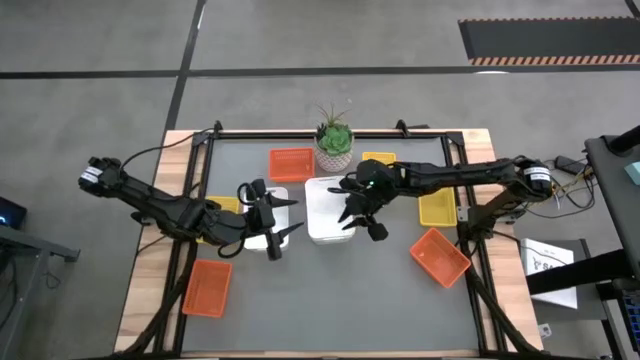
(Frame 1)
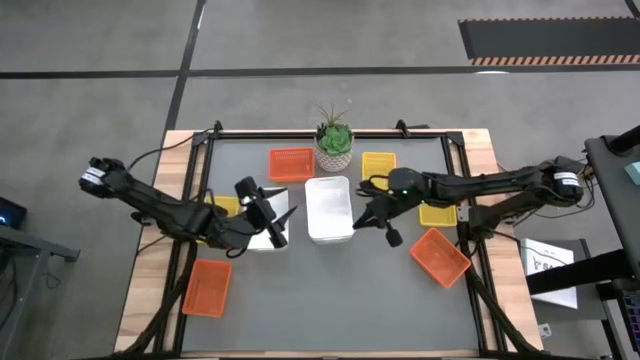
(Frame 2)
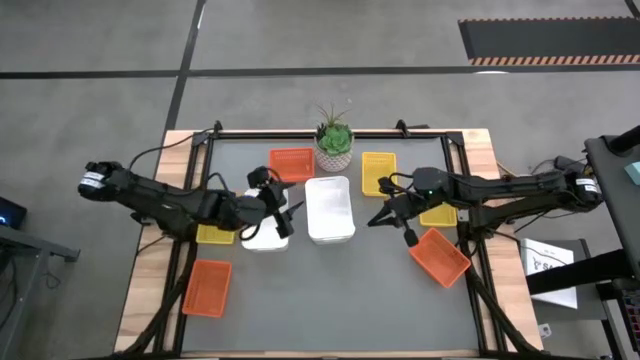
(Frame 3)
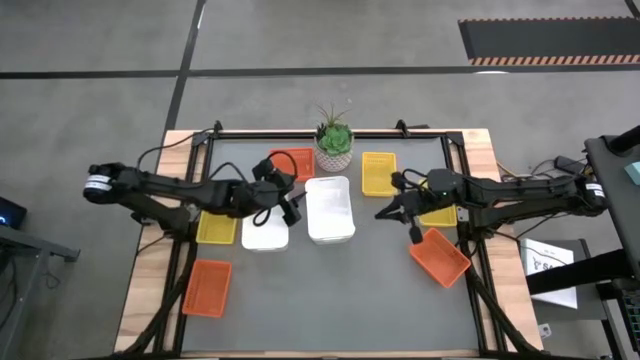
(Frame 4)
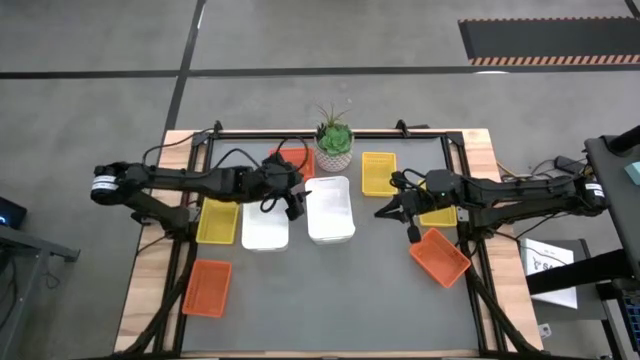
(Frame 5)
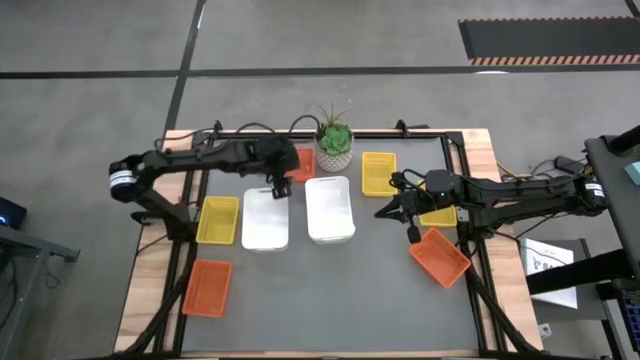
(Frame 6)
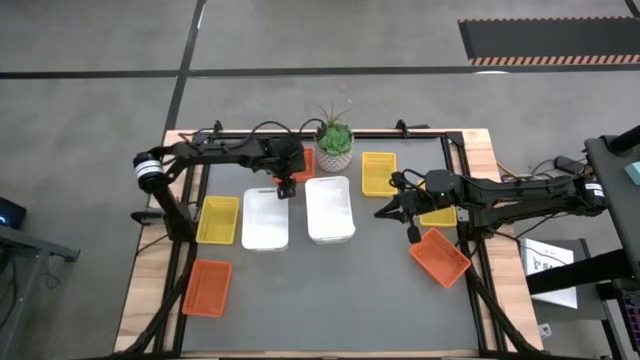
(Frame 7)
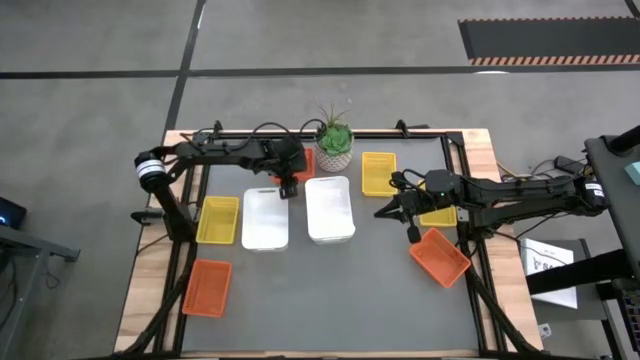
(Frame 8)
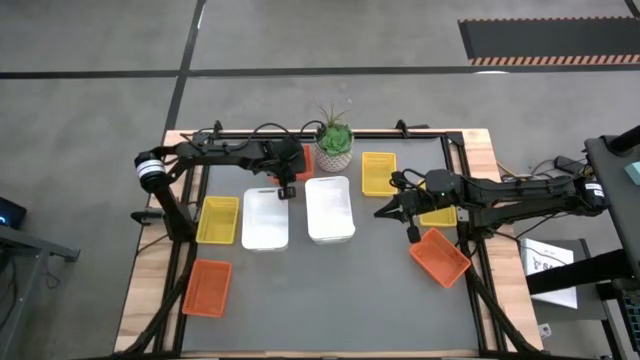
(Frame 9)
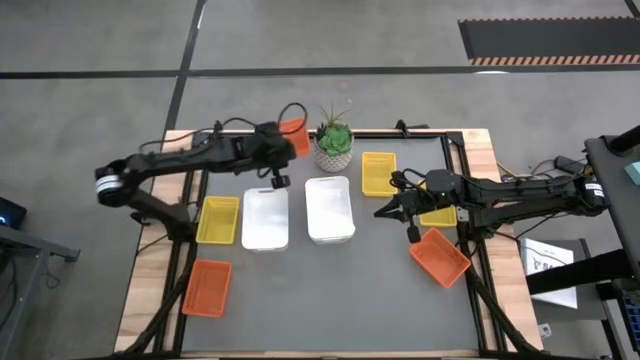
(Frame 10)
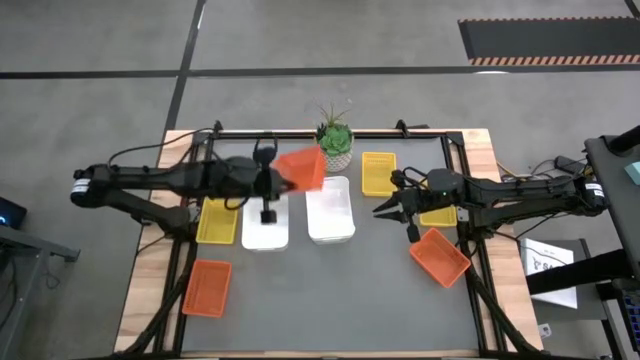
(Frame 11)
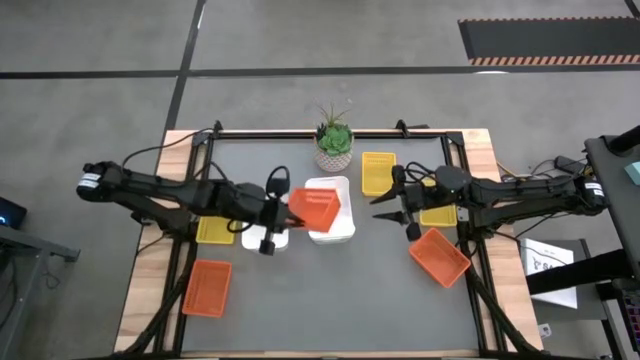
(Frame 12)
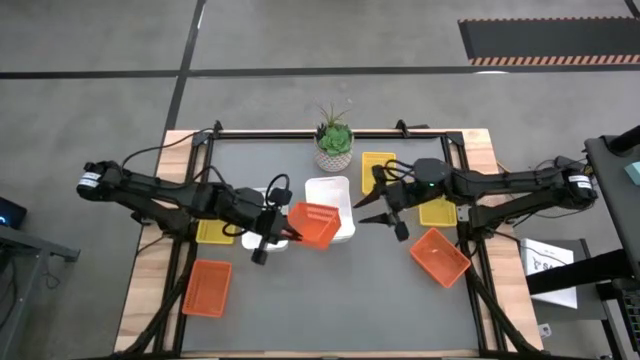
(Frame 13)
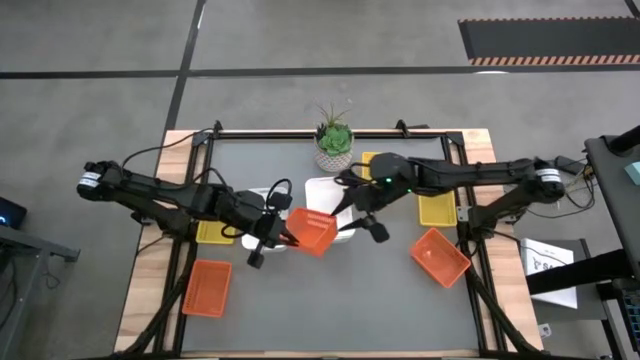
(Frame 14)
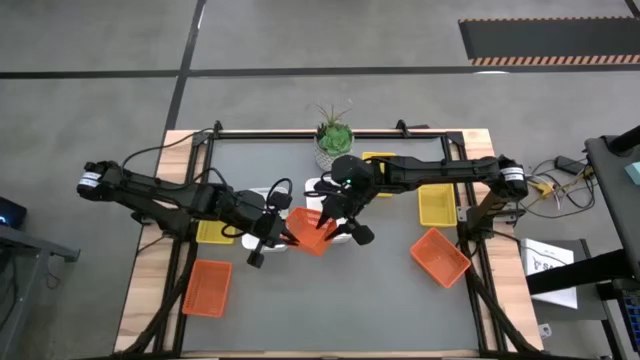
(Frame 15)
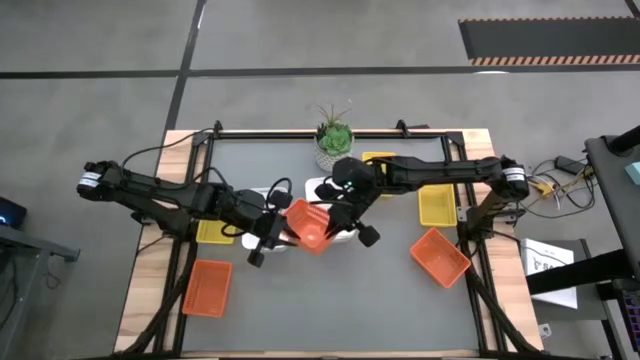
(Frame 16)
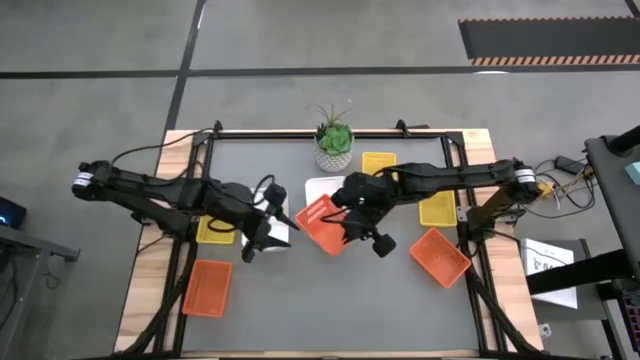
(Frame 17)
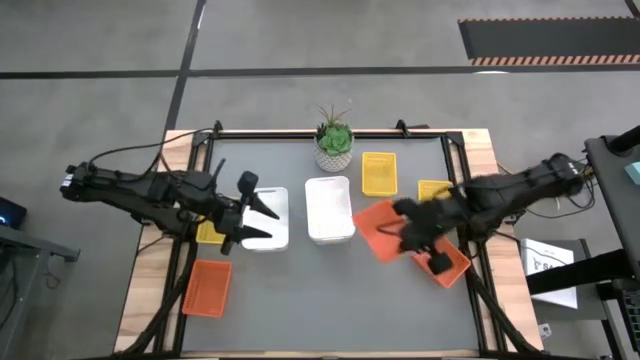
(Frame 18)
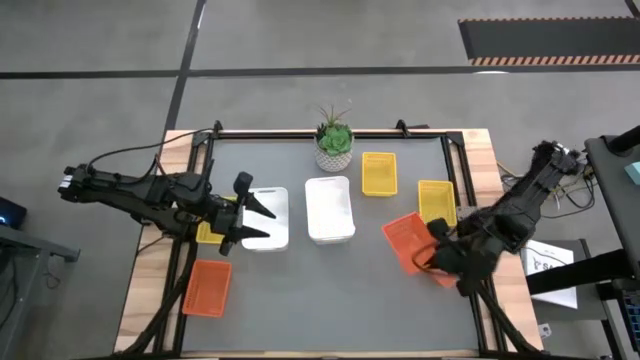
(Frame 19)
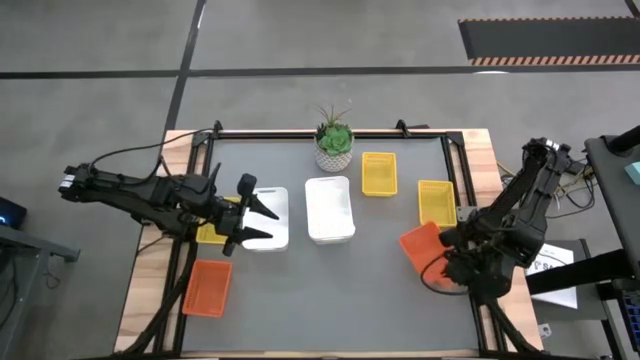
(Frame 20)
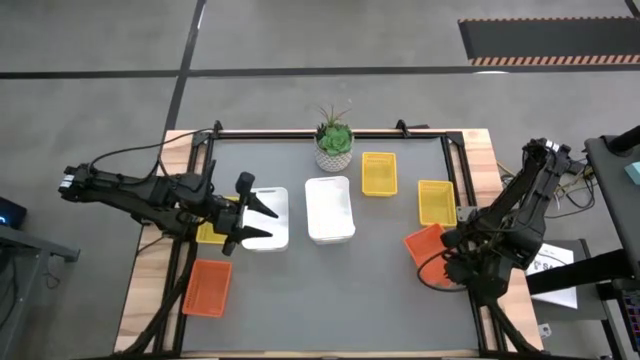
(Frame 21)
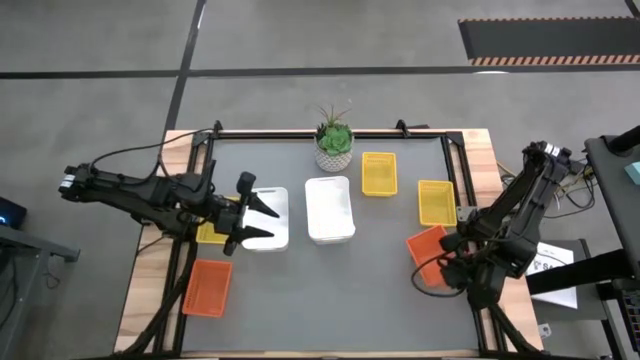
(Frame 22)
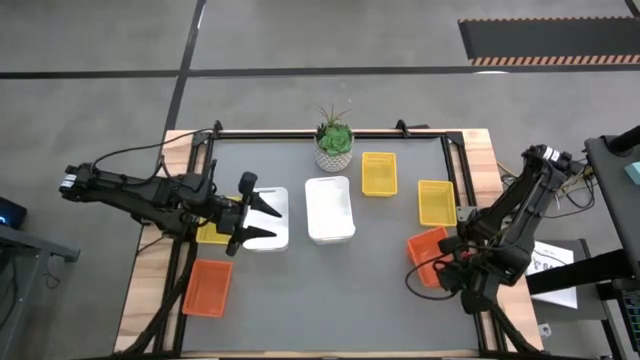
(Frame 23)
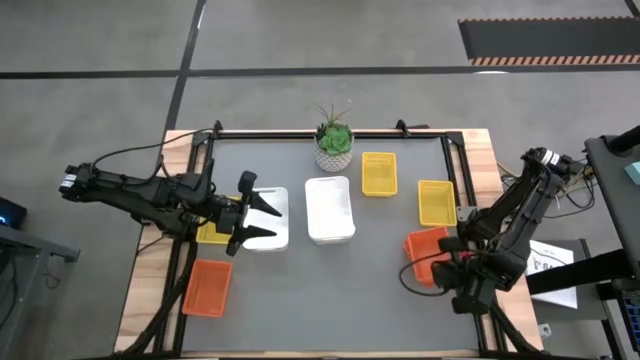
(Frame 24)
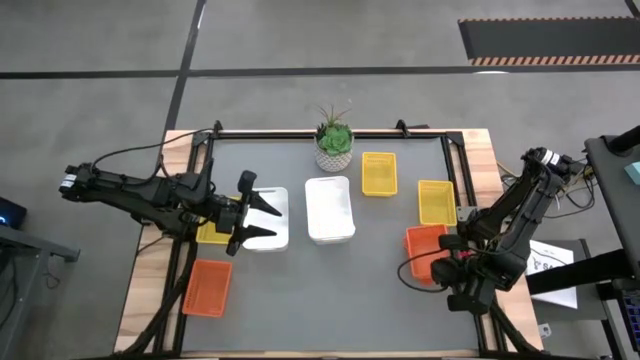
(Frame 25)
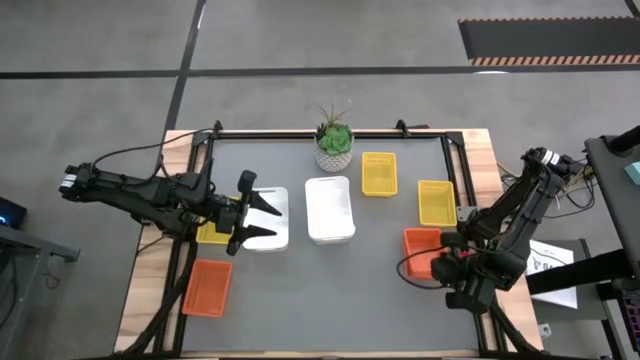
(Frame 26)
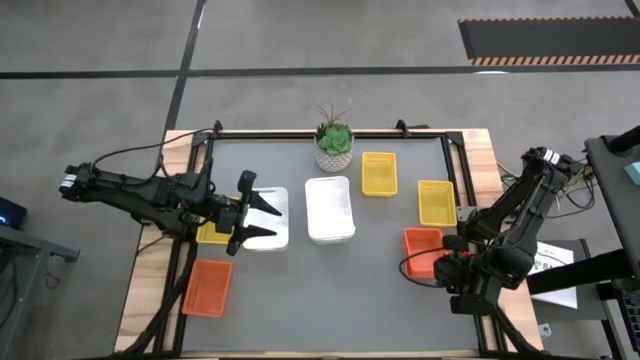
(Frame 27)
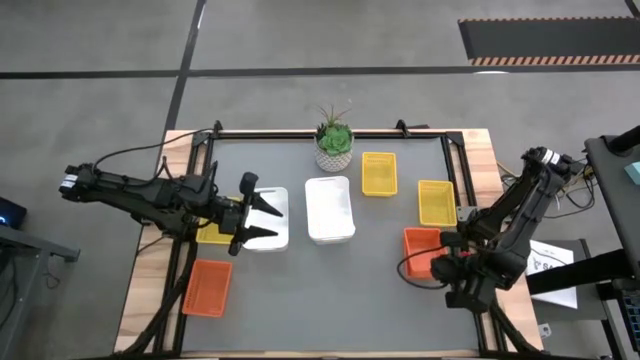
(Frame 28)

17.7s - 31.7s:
Stack the top orange bin on the right orange bin

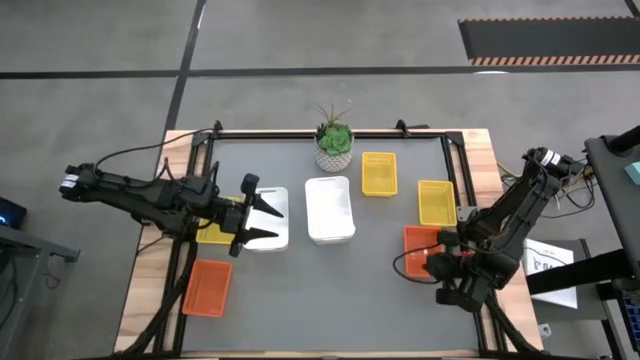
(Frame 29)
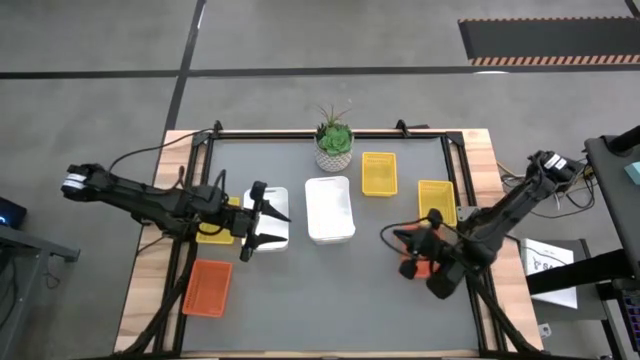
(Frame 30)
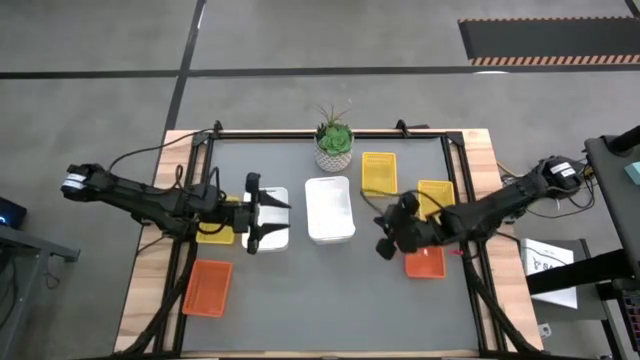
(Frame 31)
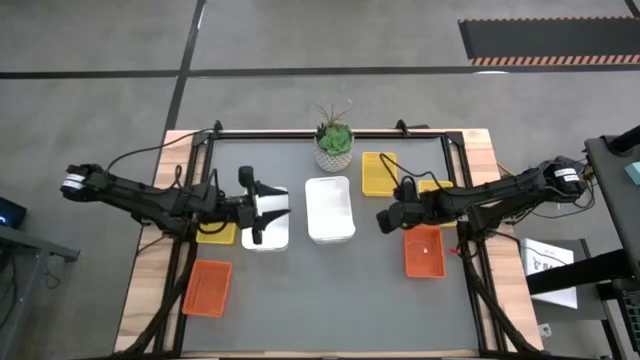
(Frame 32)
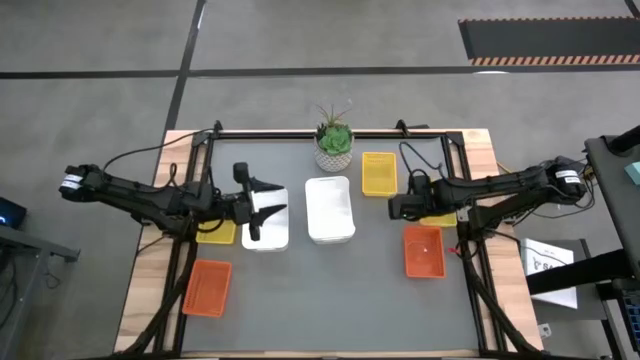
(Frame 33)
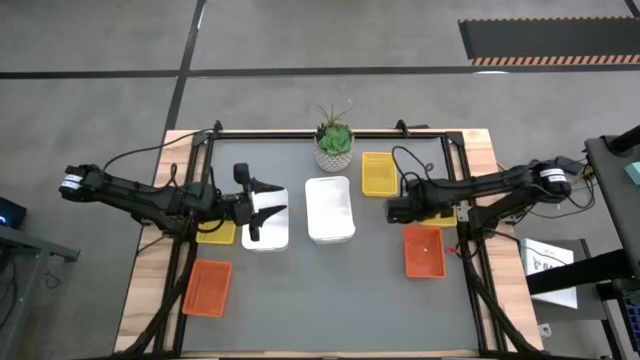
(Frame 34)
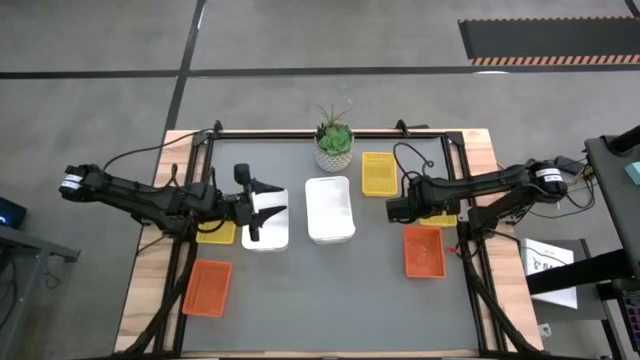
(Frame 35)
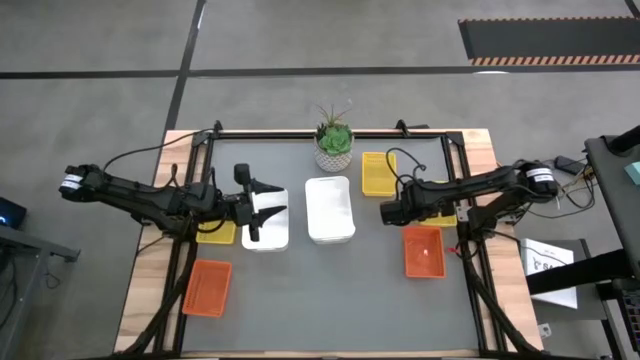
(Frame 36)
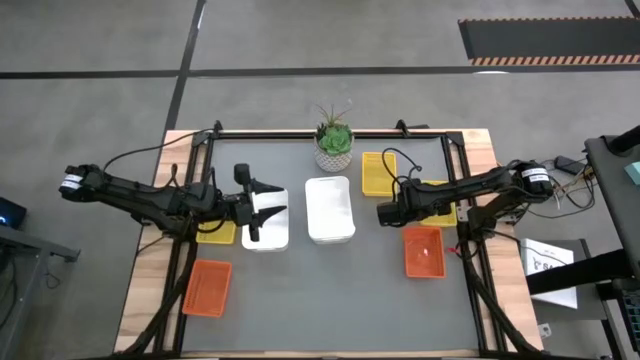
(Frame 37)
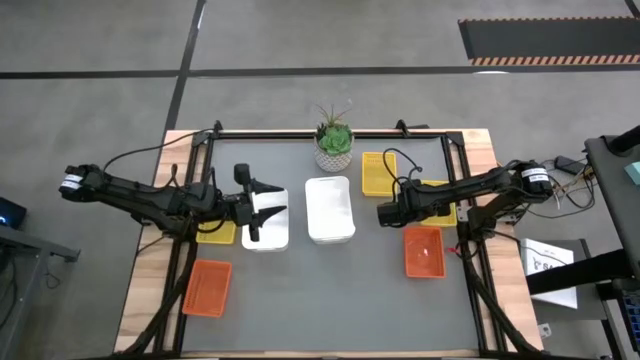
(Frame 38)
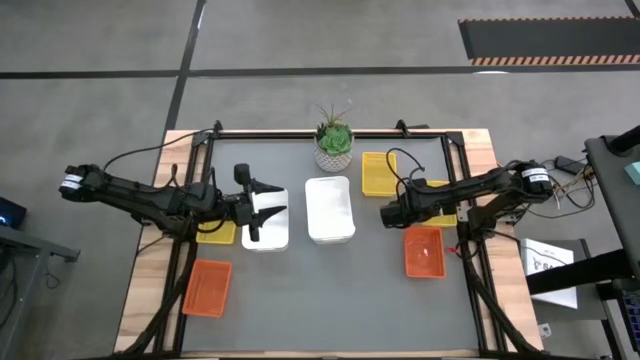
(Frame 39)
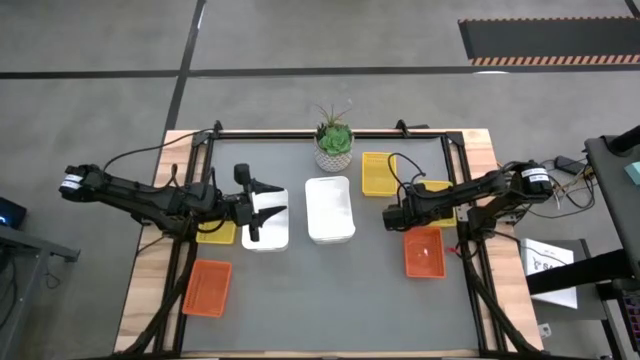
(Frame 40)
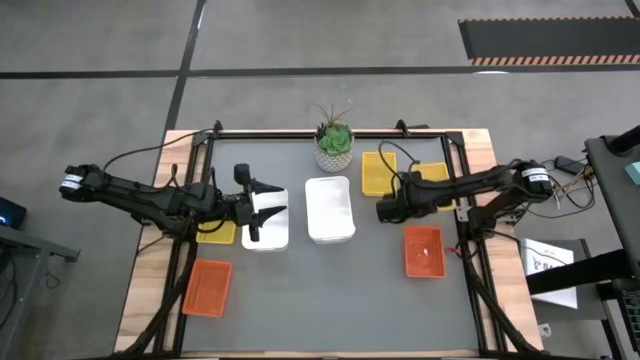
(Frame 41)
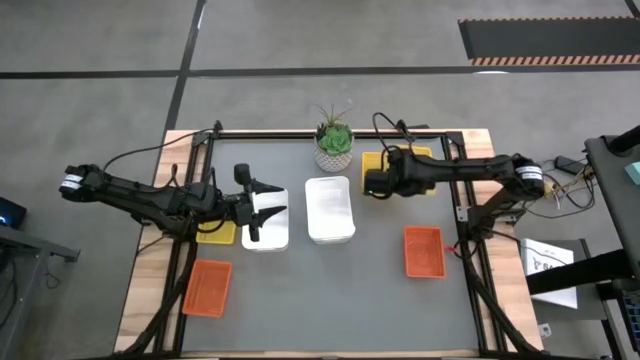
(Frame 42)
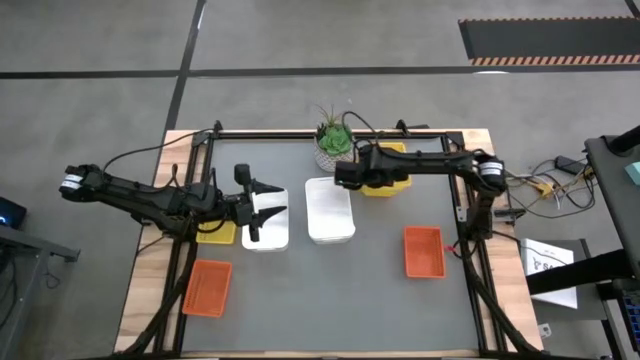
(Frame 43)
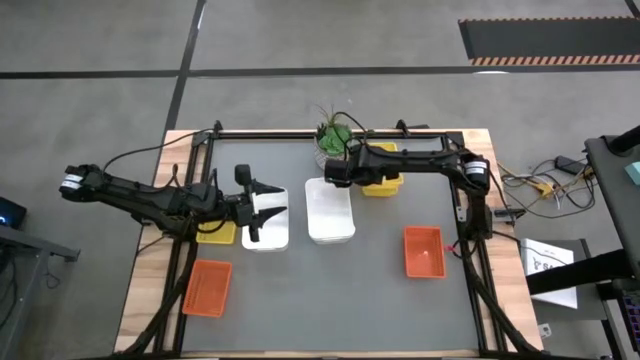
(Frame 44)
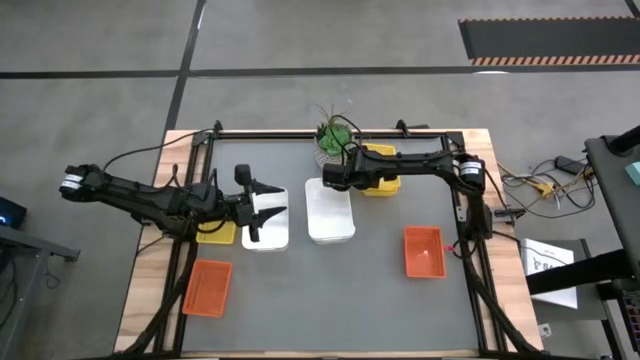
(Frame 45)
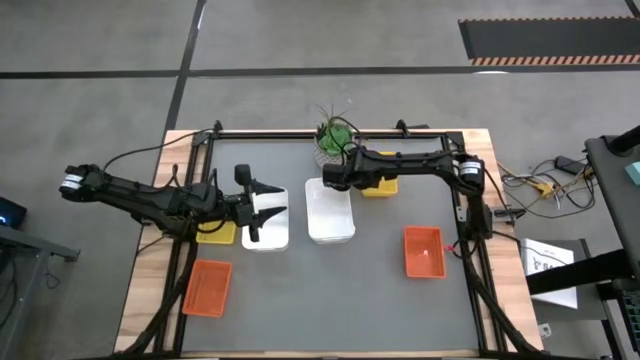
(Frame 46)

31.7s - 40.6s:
Stack the right yellow bin on the top middle yellow bin
